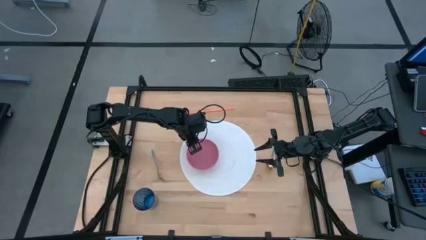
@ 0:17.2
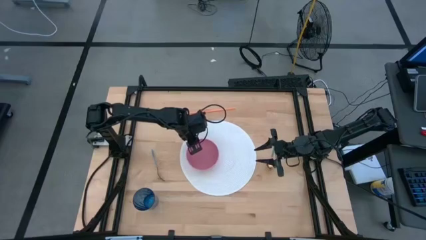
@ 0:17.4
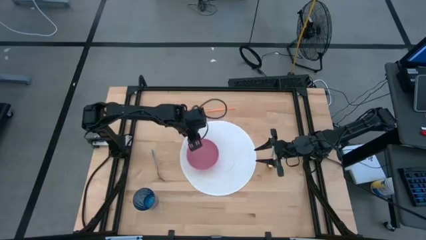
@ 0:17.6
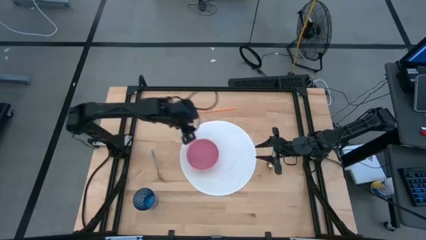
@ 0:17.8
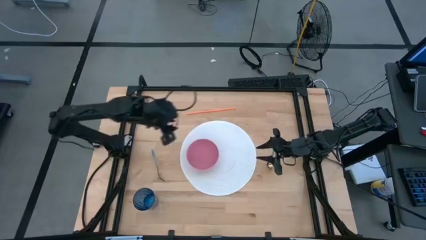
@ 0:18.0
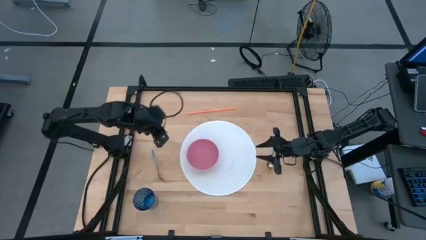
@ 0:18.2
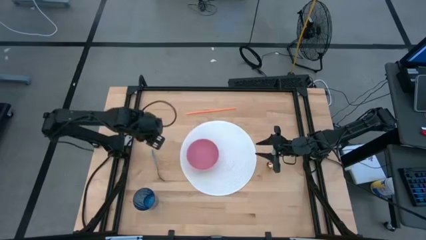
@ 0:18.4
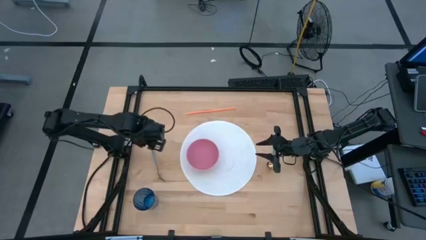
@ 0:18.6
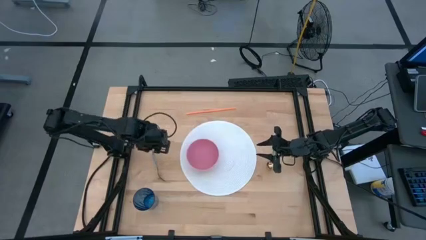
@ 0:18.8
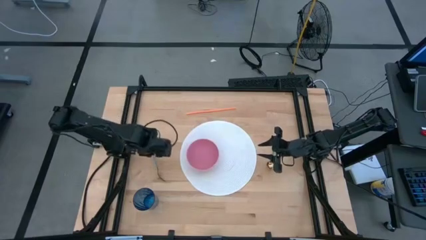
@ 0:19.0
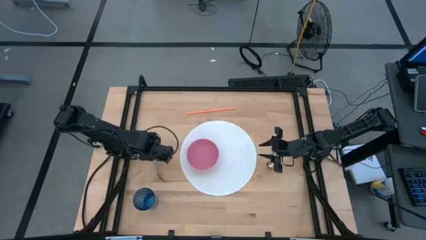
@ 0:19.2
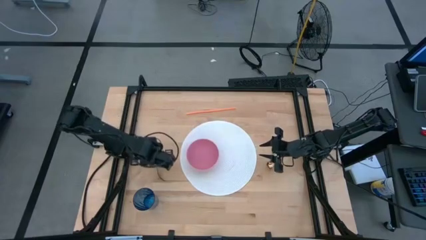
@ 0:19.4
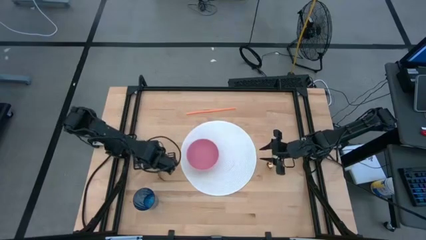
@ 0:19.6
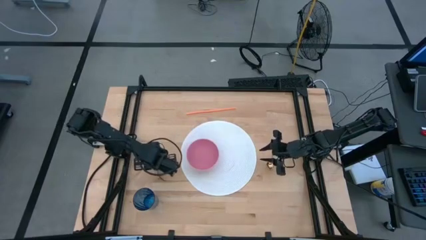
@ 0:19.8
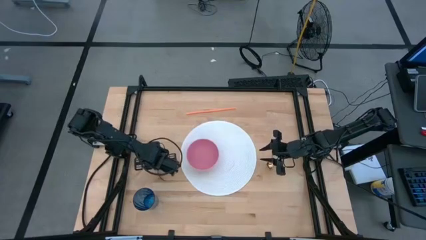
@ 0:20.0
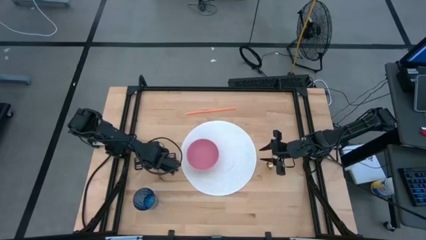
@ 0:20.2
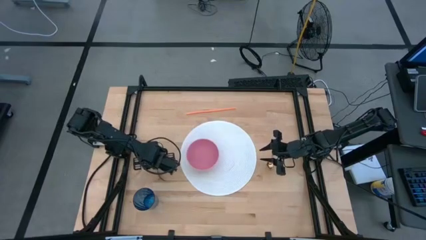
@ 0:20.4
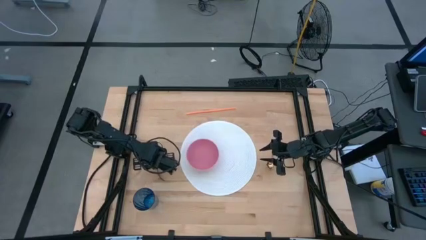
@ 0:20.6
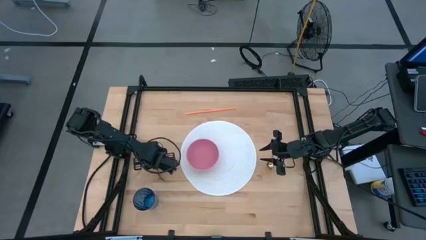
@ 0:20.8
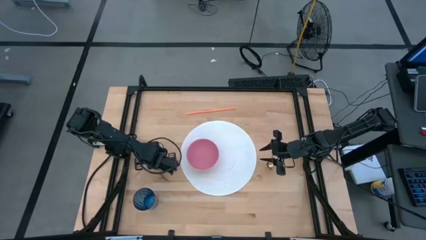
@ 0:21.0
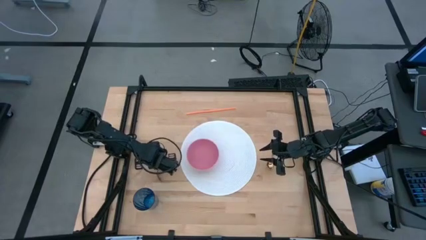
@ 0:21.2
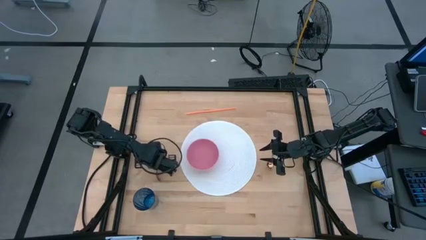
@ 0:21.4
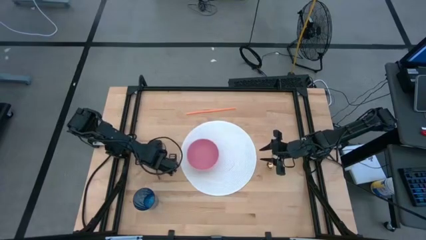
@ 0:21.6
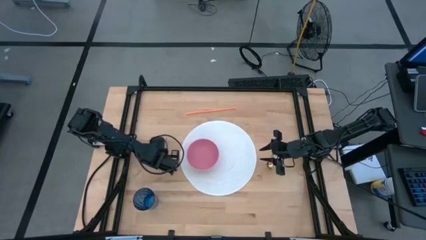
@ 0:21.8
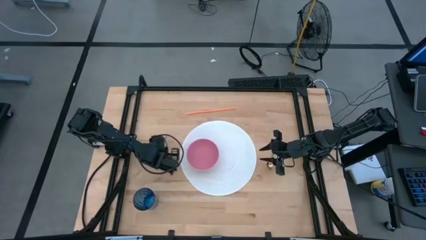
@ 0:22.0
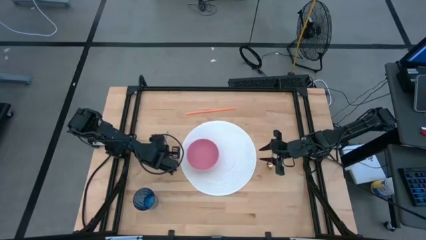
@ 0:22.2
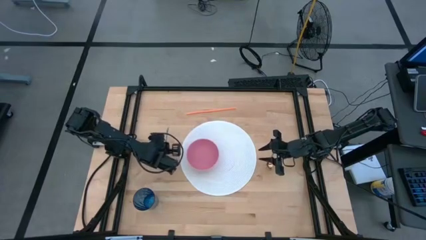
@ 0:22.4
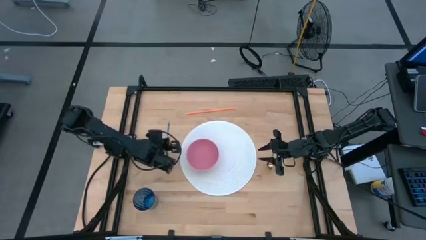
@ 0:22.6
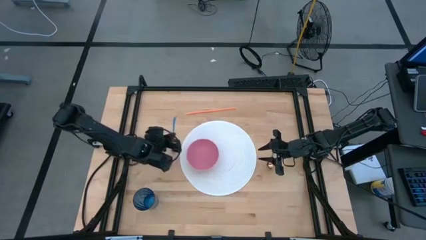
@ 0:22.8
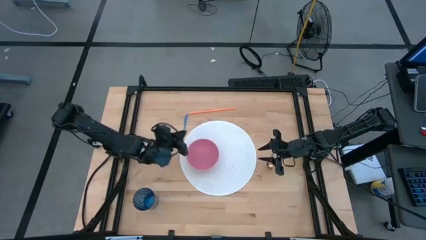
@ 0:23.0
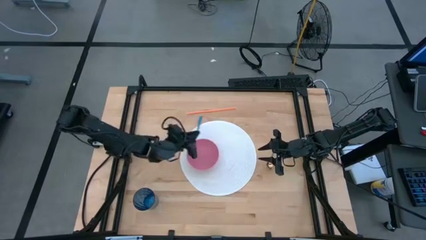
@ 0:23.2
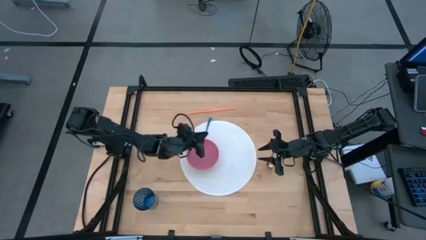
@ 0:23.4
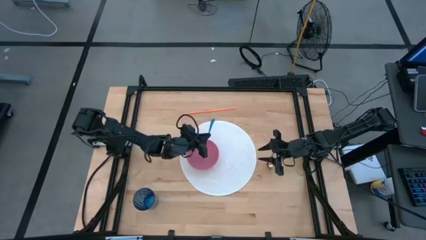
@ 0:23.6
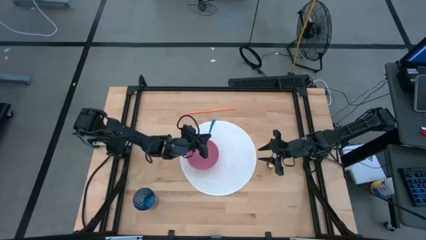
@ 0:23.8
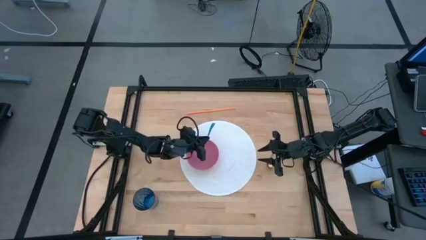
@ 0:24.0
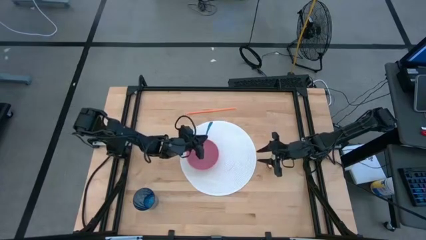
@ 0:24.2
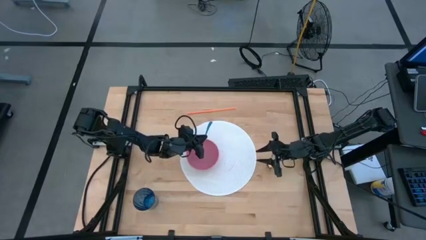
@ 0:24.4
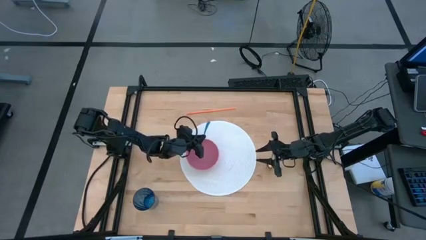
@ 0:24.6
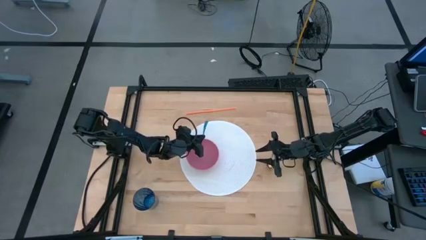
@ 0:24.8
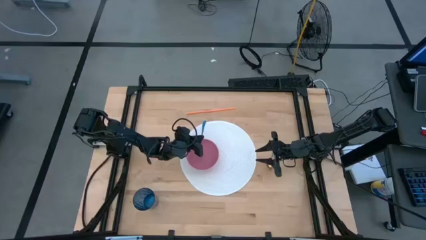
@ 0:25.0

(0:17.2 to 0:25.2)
Task: Pick & Place Utensil
Put the blue fork into the pink bowl

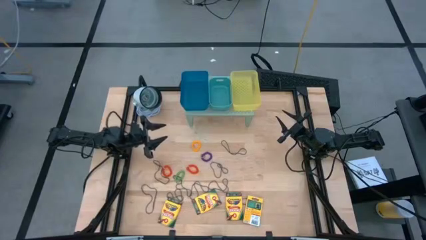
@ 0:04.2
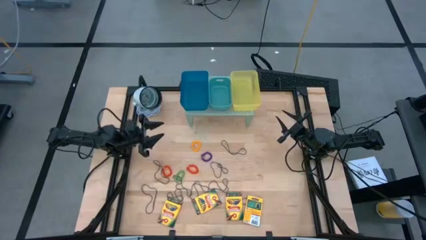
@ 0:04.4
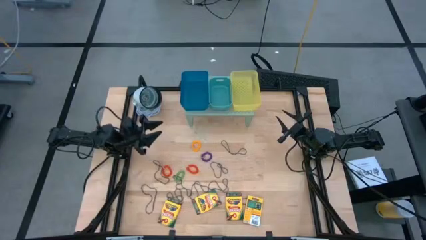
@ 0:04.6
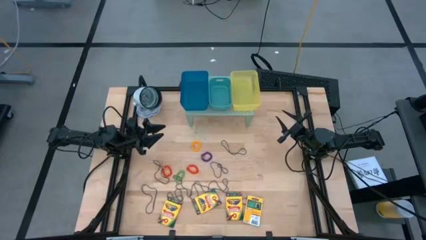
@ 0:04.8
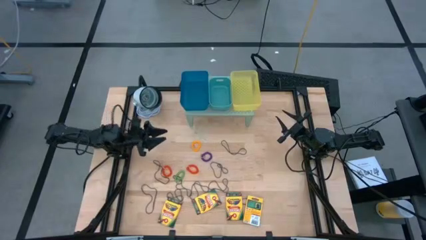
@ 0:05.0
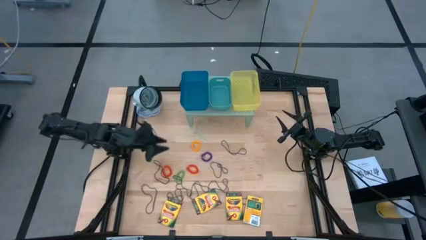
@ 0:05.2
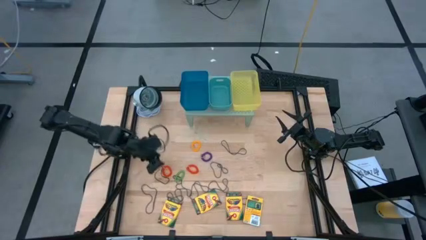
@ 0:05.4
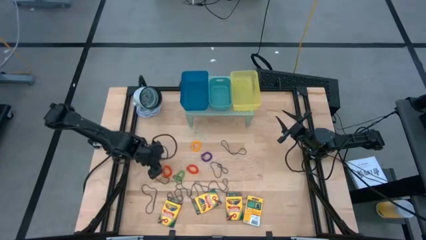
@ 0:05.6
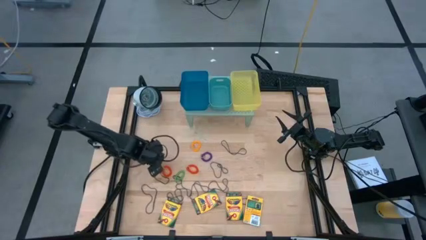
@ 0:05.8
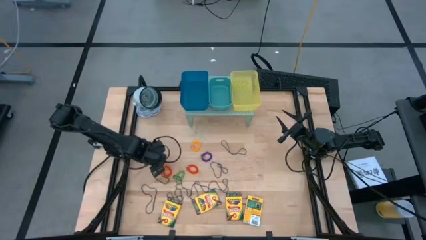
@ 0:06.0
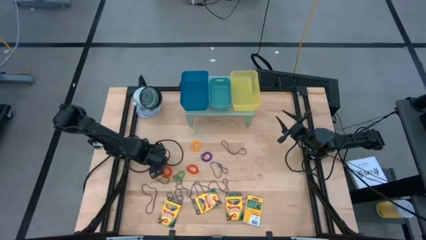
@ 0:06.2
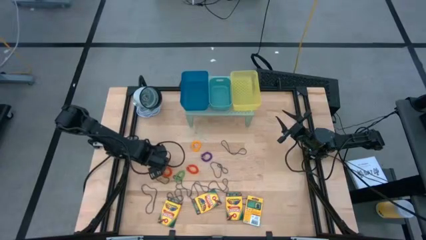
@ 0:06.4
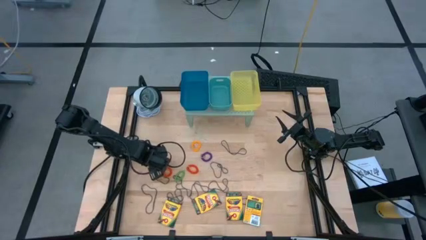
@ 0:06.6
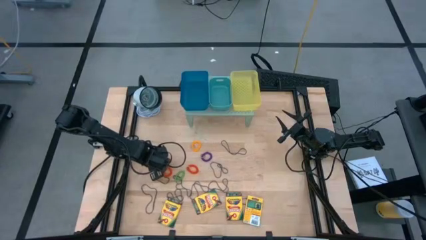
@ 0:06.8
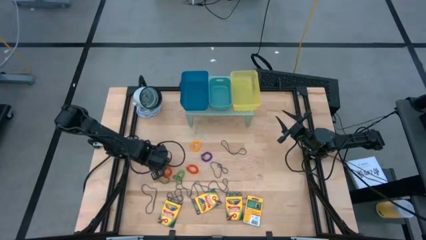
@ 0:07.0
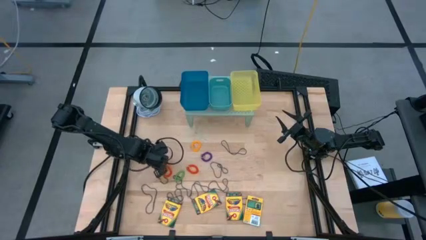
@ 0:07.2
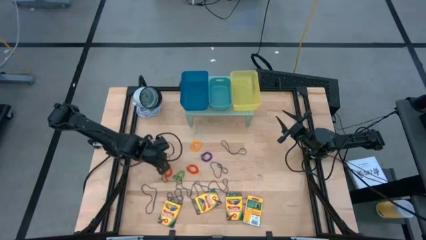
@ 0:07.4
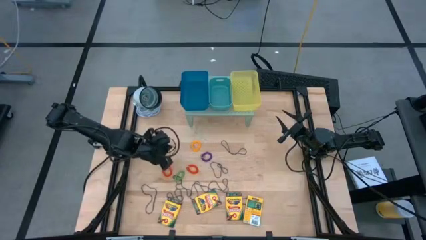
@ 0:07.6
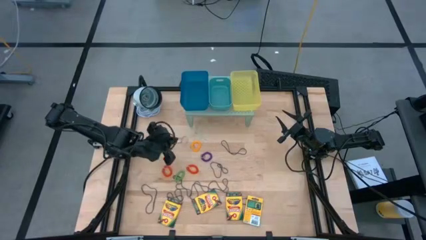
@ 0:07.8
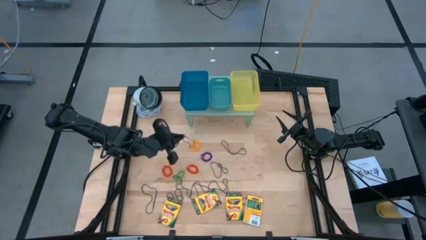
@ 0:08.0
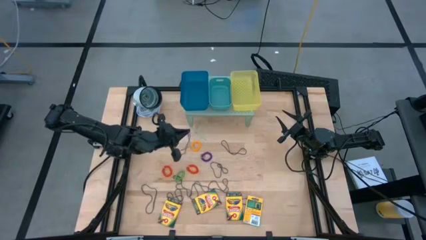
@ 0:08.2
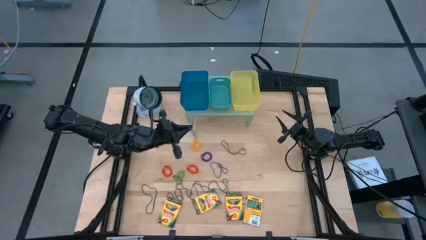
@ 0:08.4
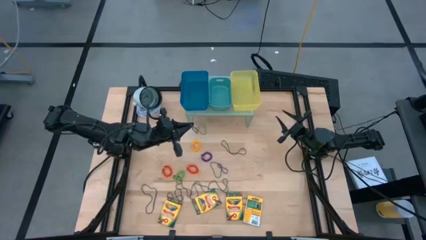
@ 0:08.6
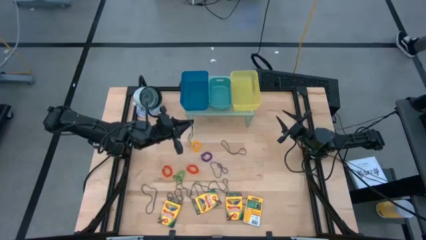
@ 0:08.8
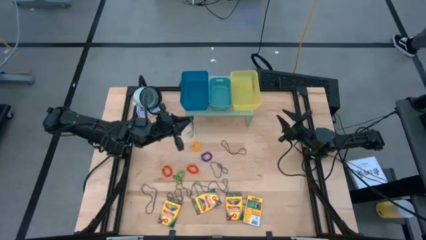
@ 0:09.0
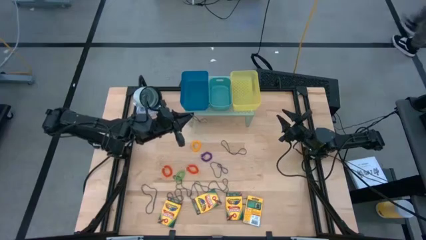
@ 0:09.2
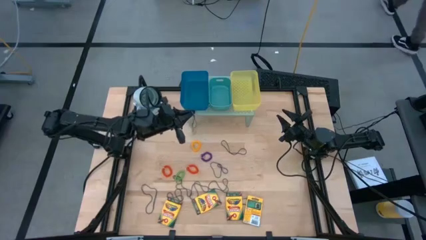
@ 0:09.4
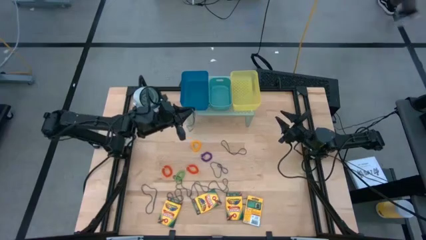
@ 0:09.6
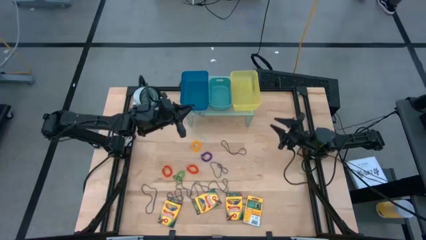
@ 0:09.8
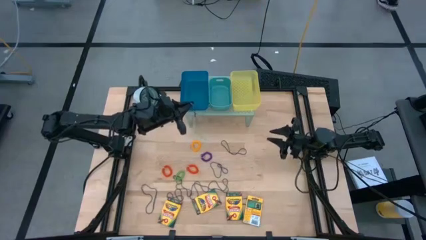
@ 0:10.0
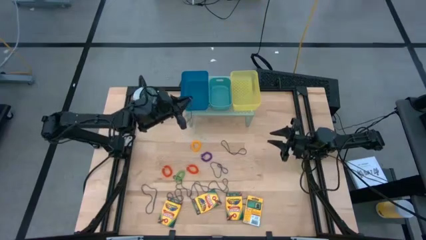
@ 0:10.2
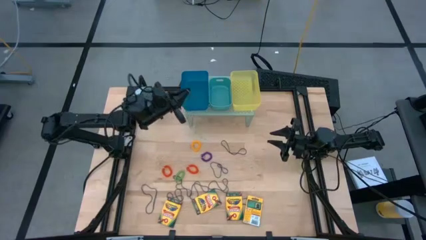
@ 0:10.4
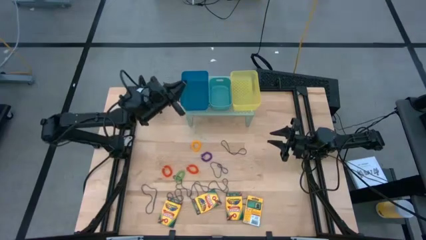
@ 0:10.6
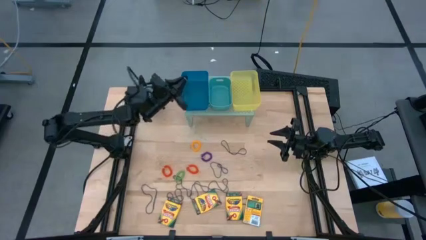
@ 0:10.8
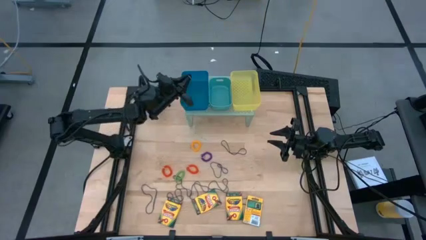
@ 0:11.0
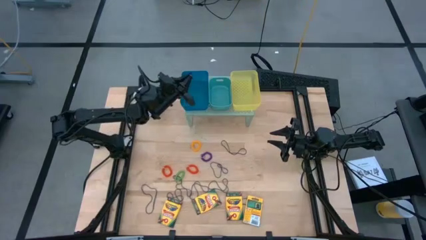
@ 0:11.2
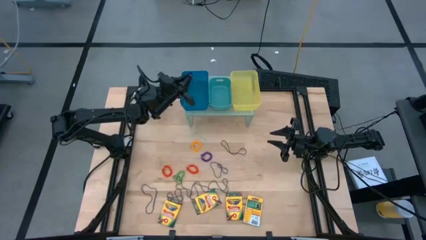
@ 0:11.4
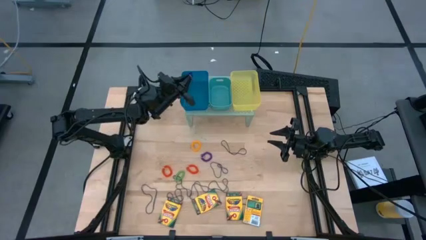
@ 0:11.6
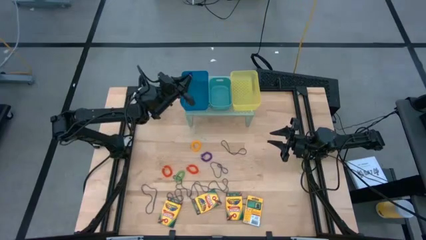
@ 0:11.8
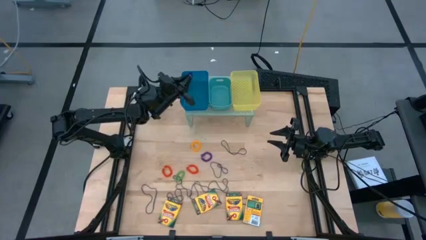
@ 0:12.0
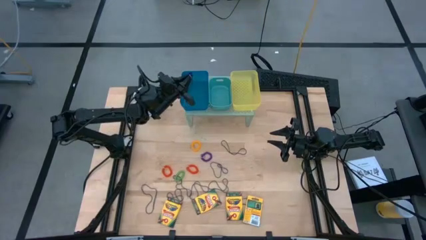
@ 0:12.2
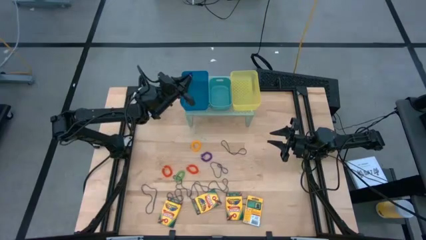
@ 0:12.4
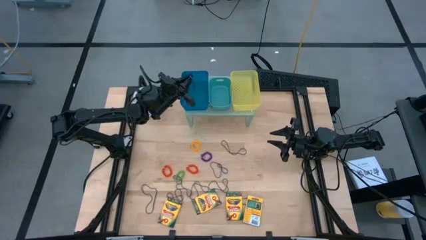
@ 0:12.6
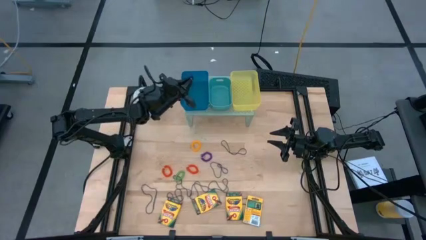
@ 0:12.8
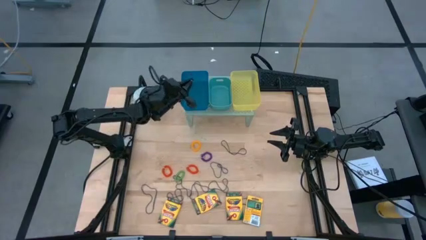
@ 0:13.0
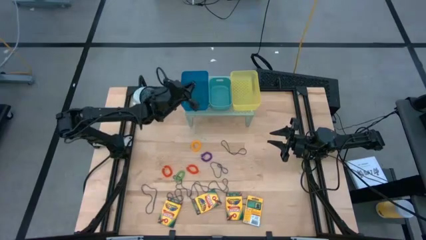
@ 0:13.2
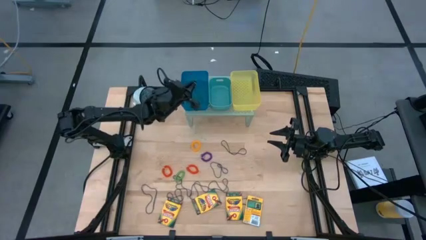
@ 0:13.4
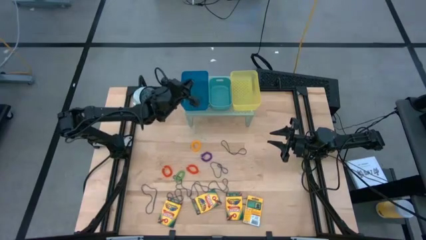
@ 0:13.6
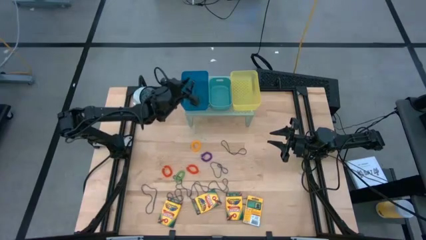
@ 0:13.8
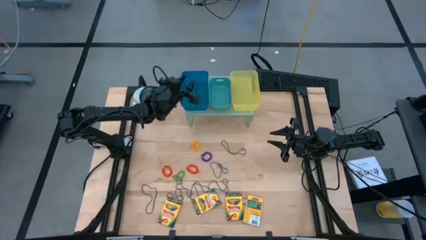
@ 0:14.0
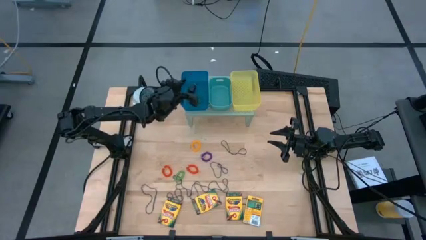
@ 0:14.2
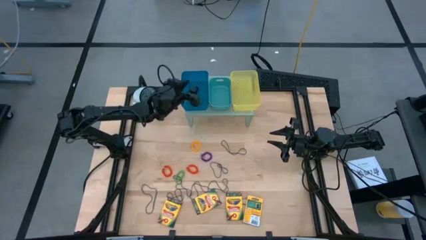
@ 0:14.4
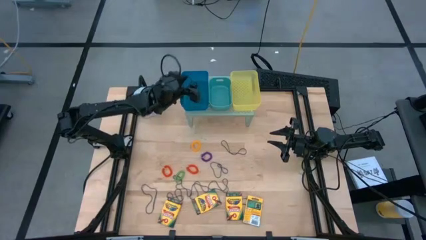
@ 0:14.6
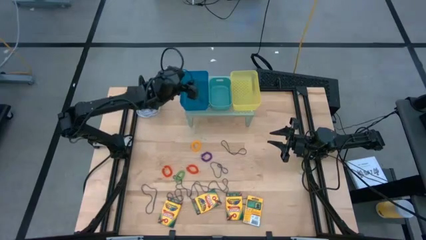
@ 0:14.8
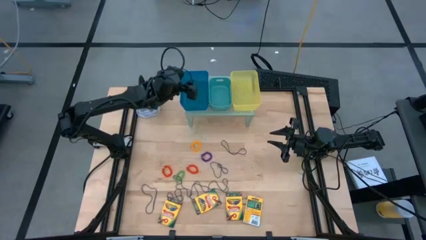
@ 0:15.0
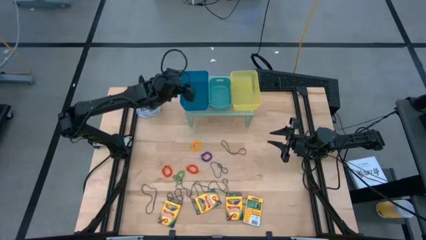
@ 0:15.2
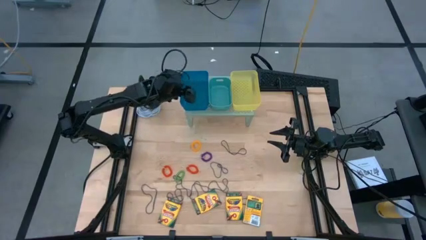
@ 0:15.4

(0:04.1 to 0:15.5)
Task: Pick & Place Office Desk Supplies
Put the purple rubber band into the blue bin on the shelf
